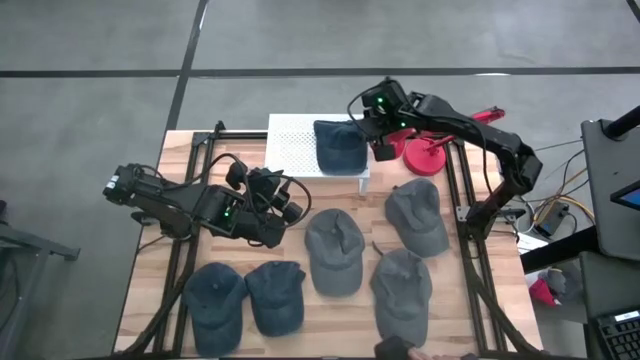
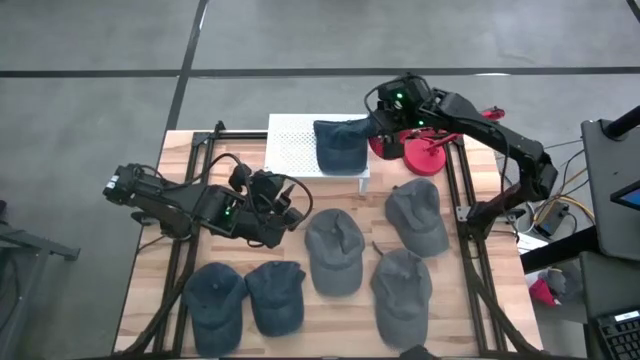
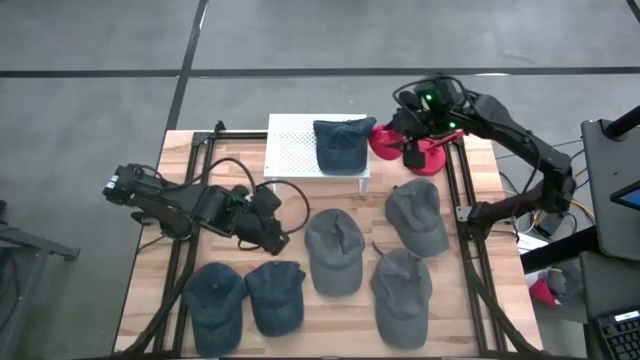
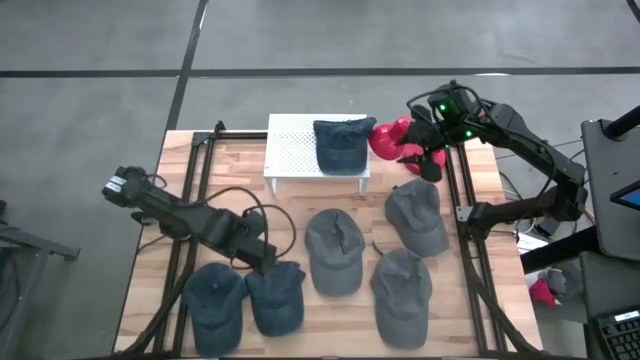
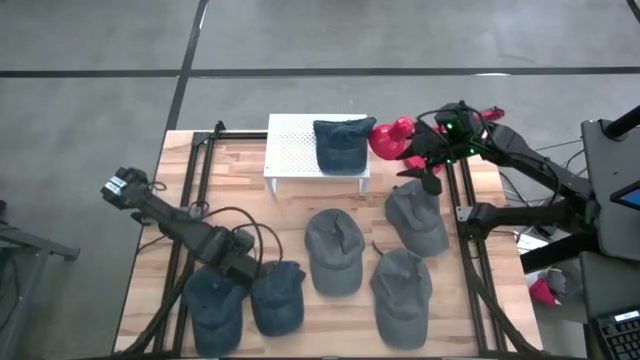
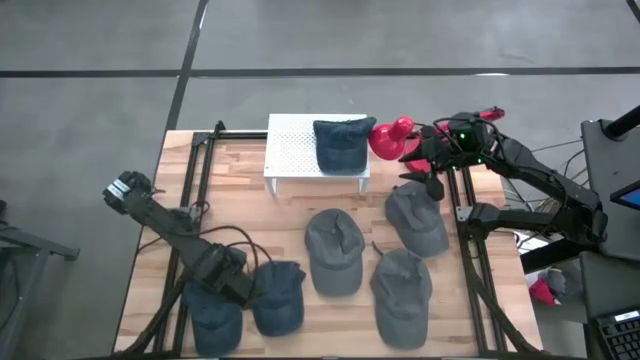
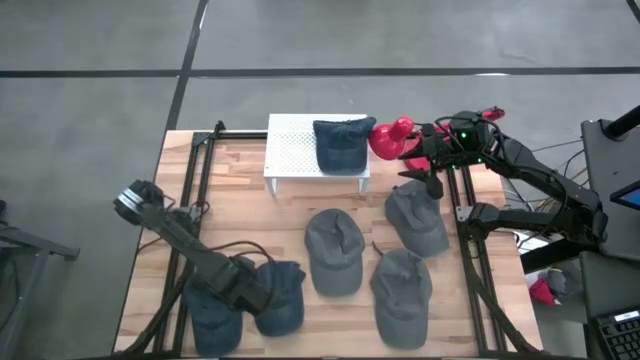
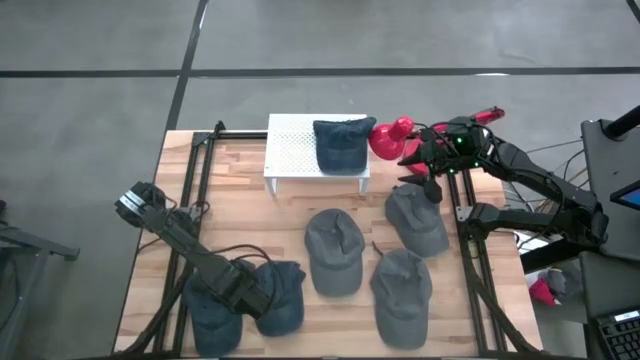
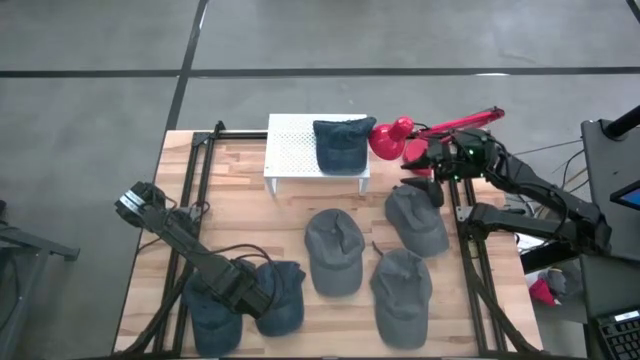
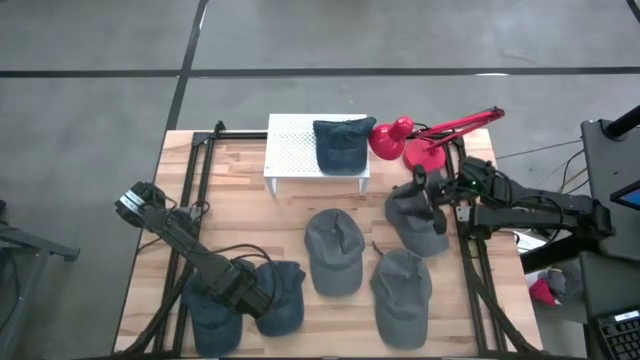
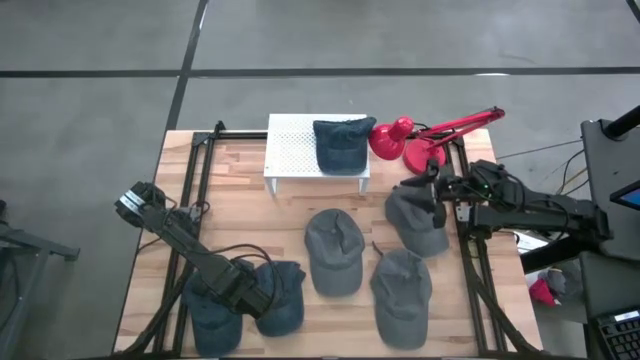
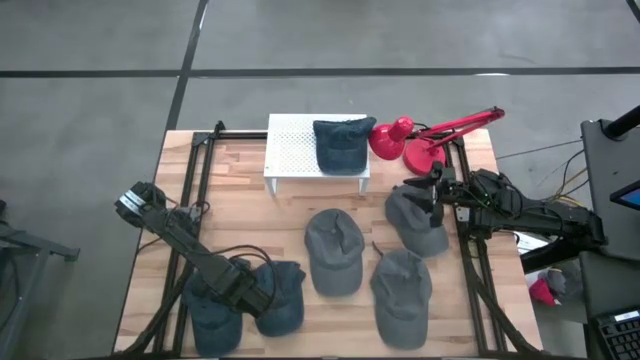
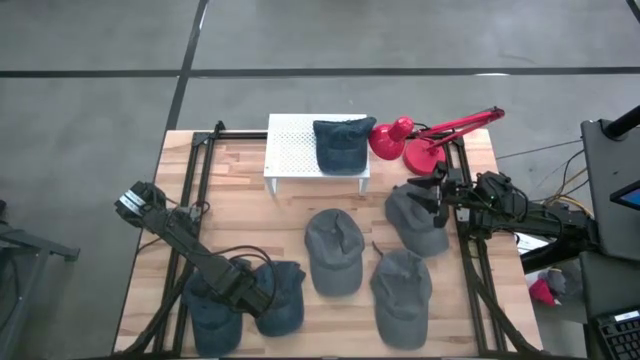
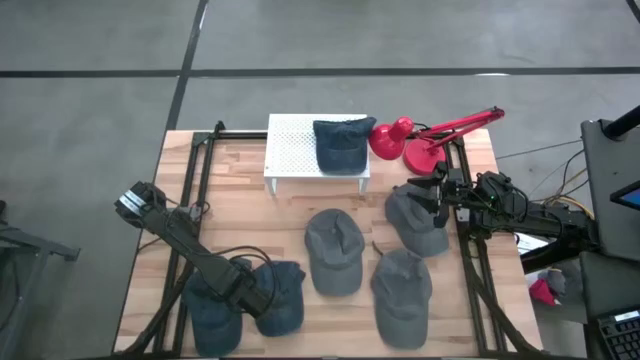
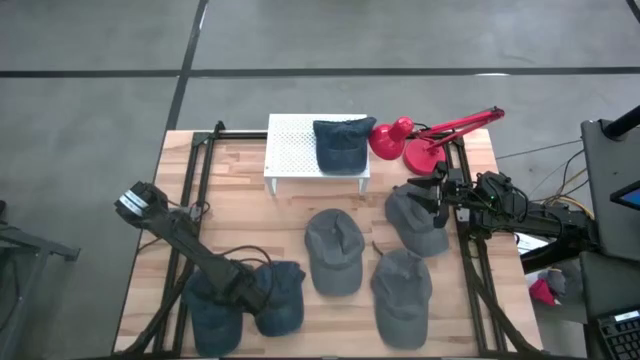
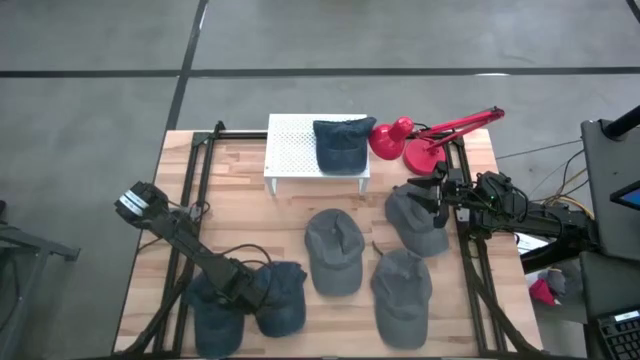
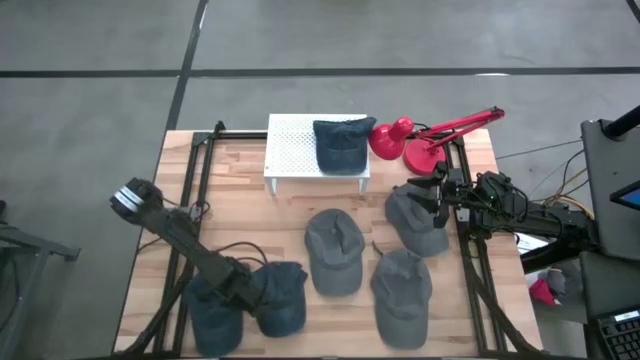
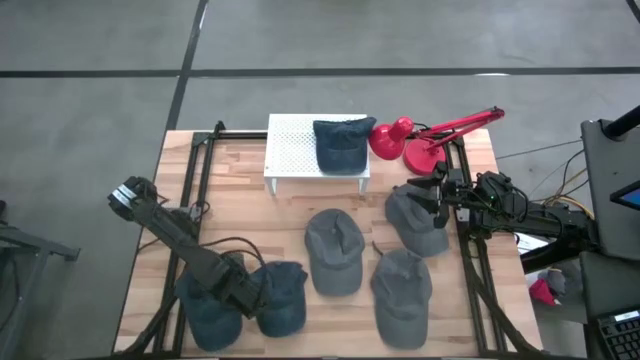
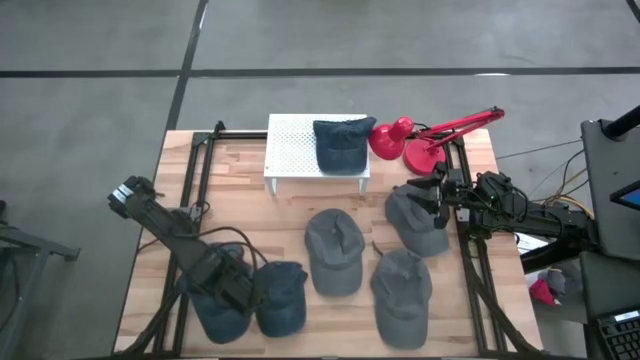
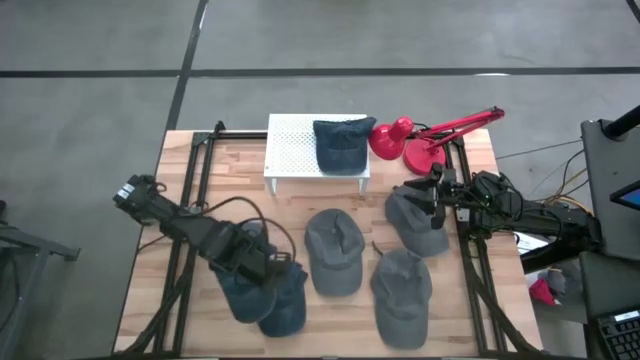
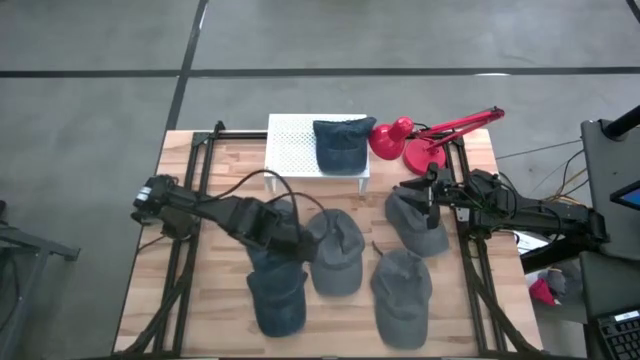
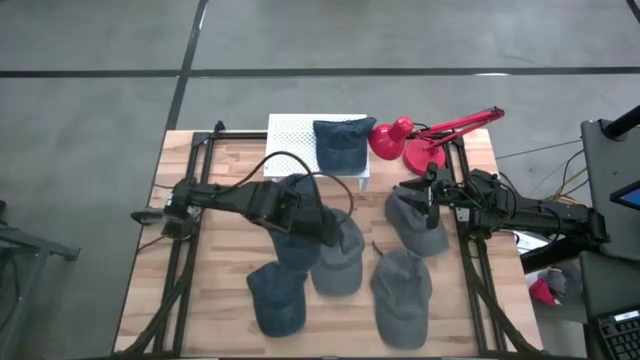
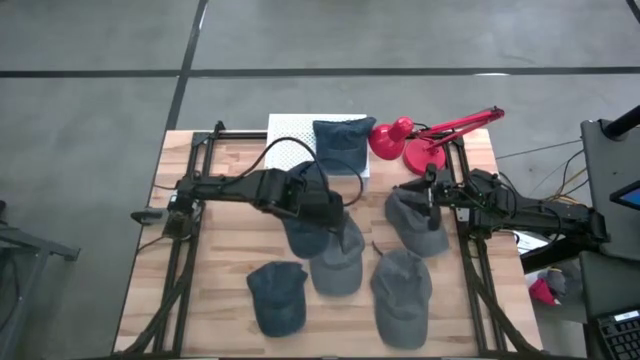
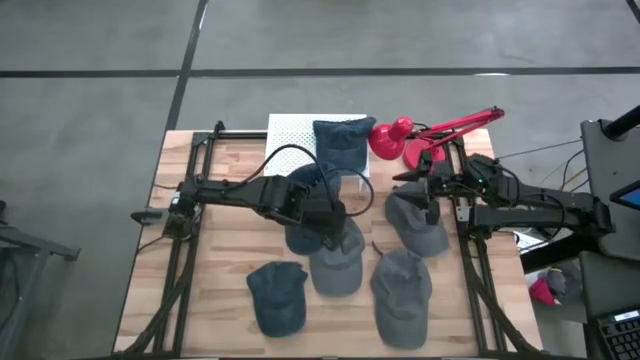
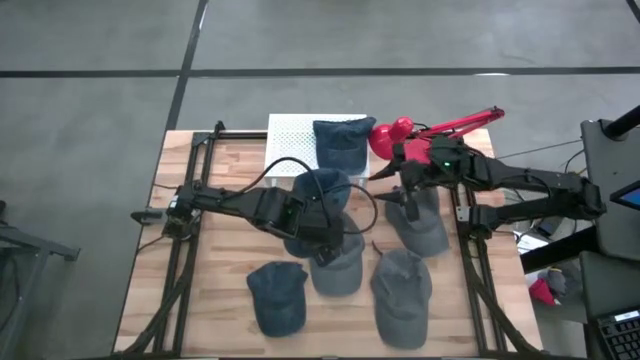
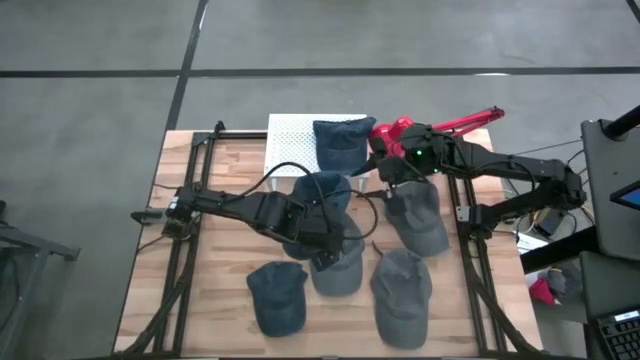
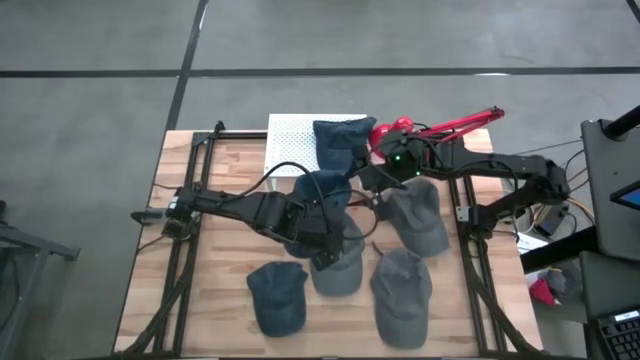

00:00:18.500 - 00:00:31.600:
Task: Pick & Place hat
Stack the left blue cap on top of the blue cap on the shelf

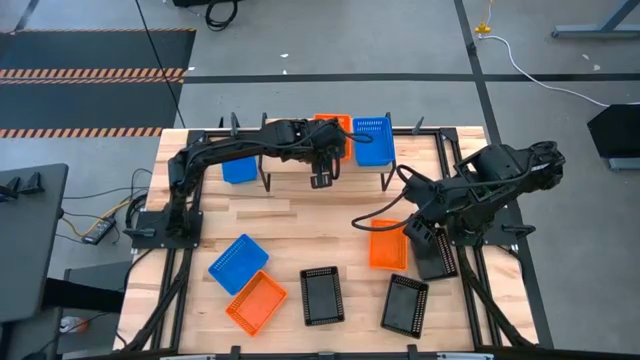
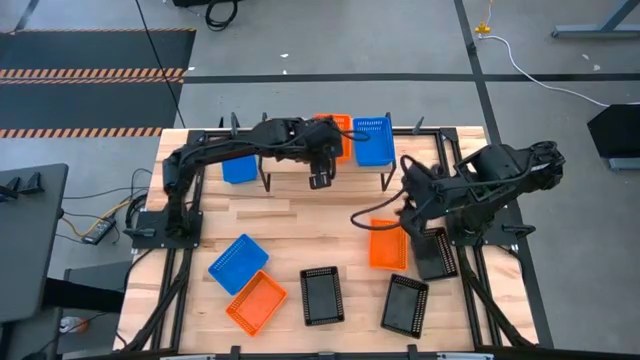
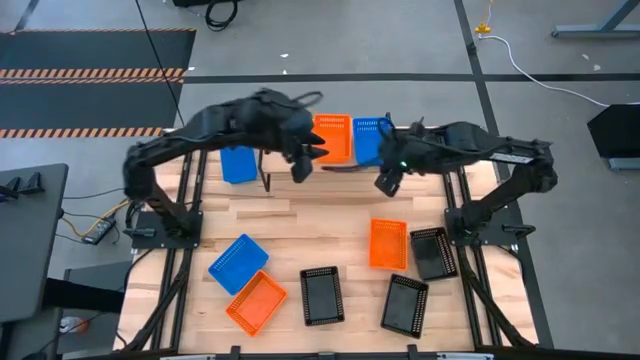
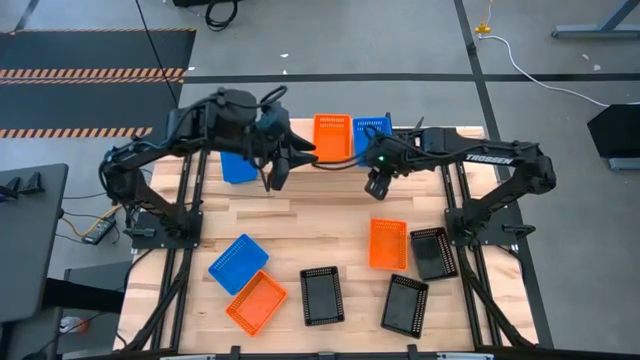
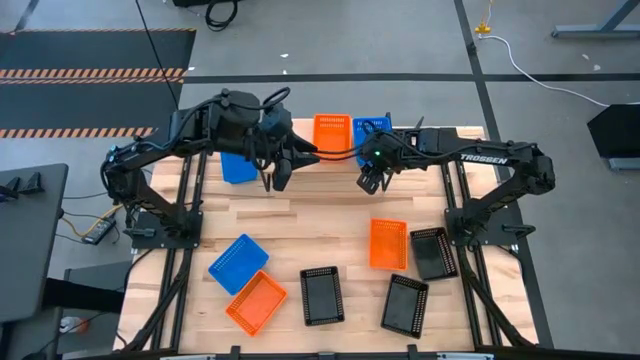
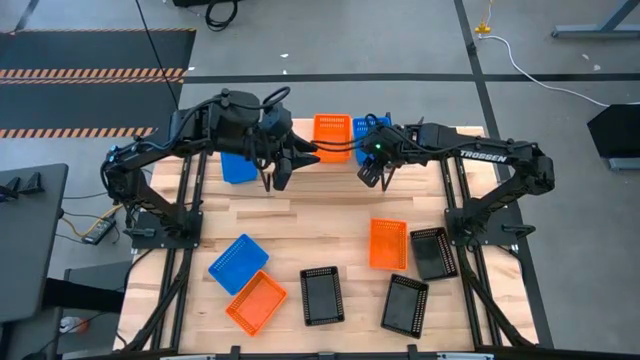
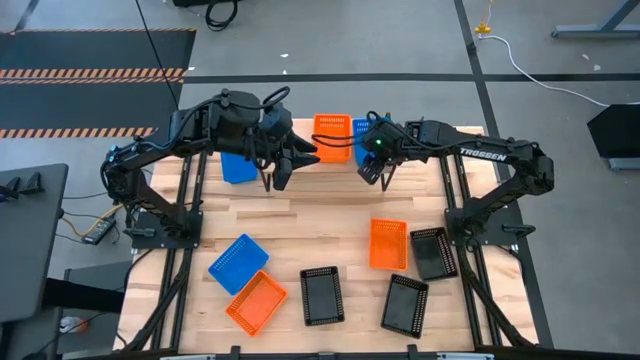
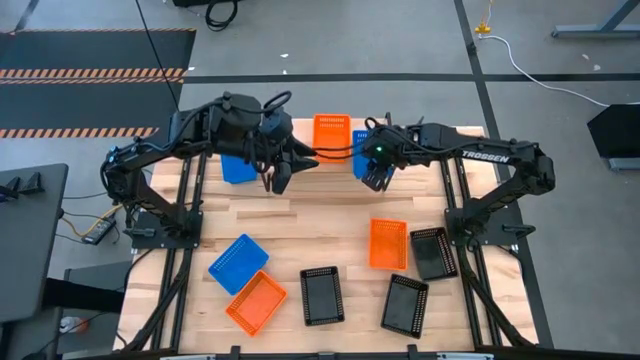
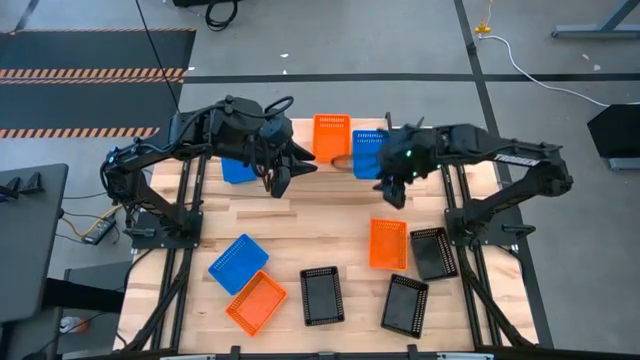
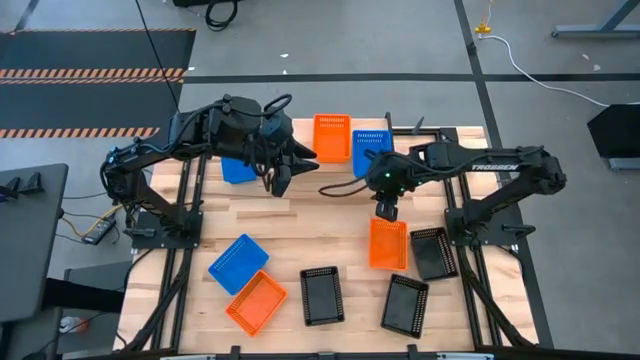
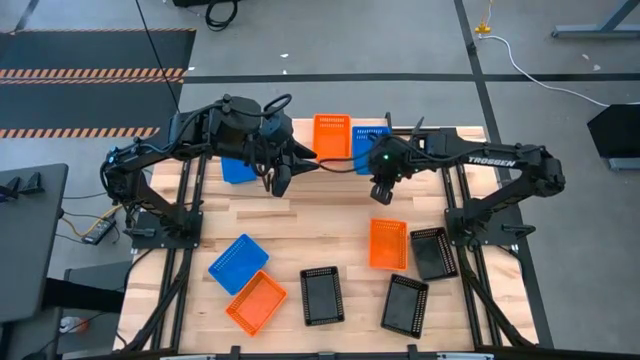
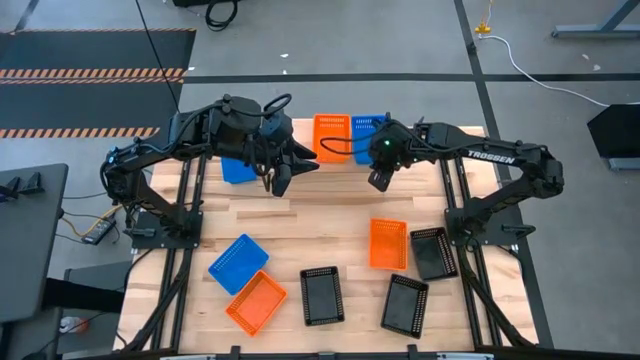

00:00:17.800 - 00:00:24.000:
Task: Stack baskets on shelf by color
Adjust the blue bin on the shelf

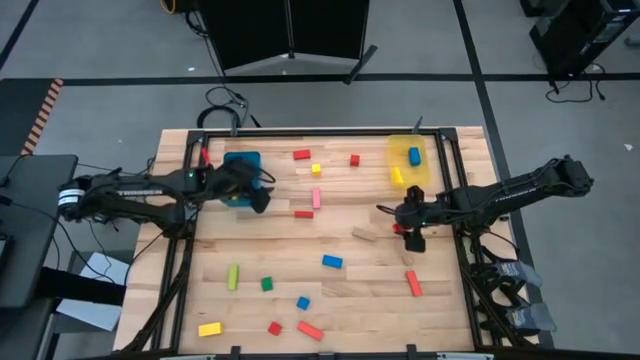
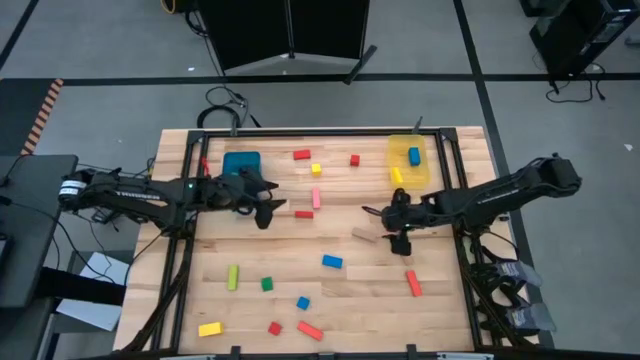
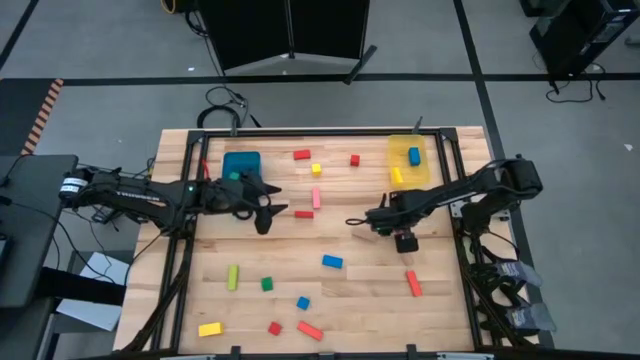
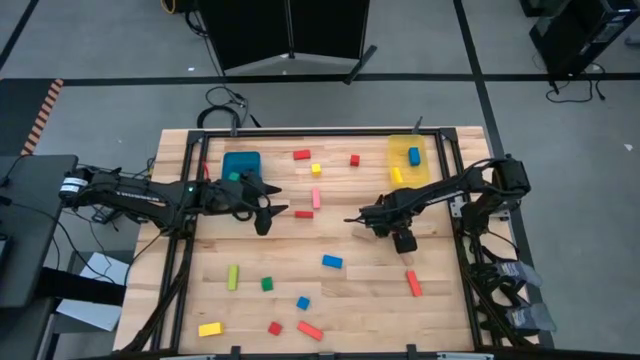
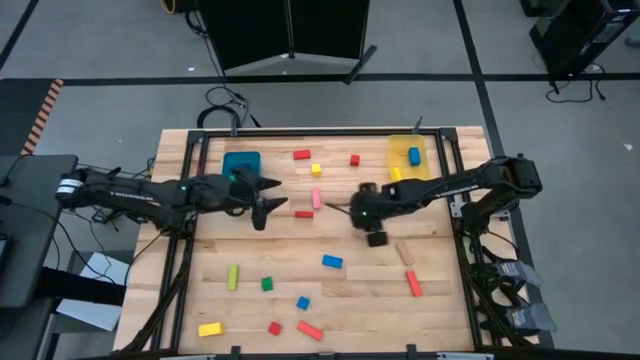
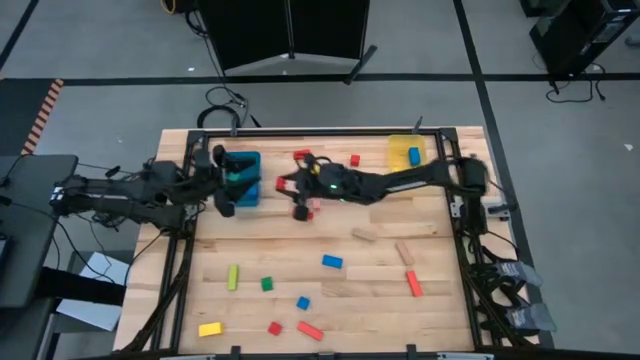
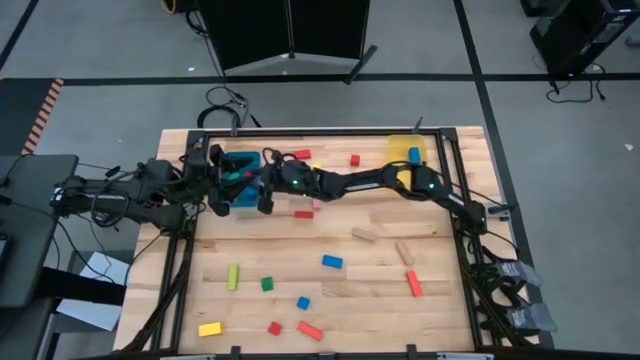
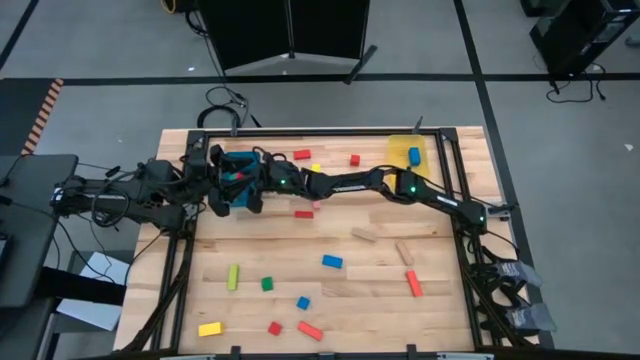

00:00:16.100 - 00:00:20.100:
Task: Sort blocks by size
Put the small red game piece into the blue bin
